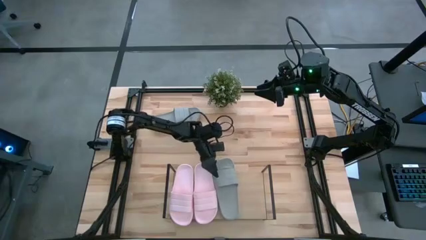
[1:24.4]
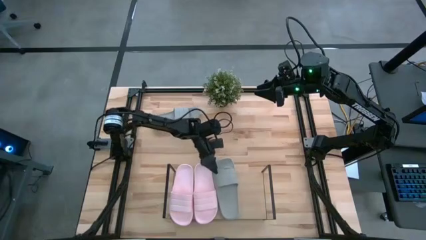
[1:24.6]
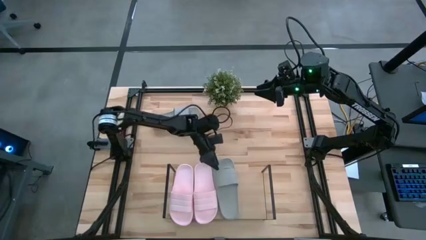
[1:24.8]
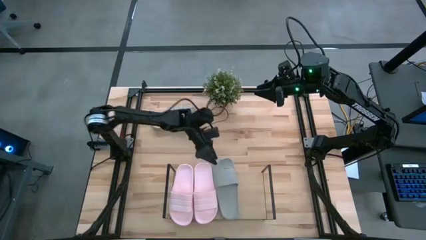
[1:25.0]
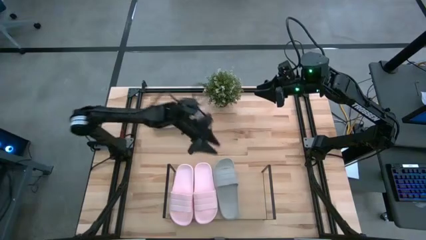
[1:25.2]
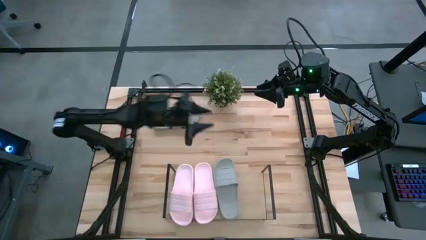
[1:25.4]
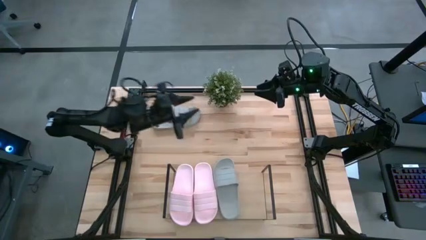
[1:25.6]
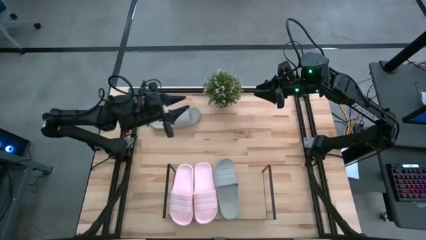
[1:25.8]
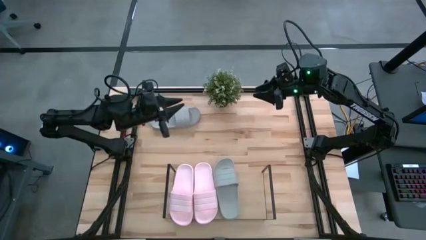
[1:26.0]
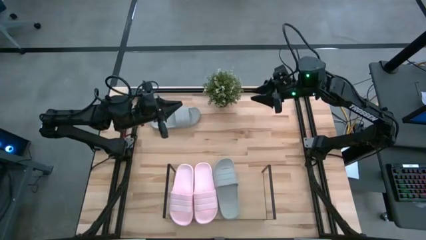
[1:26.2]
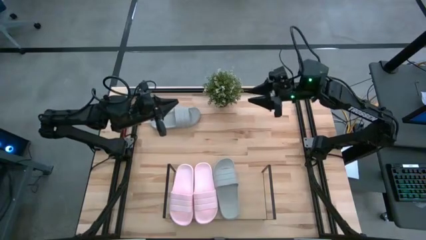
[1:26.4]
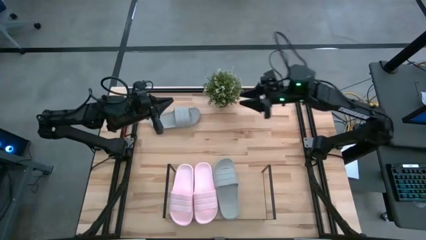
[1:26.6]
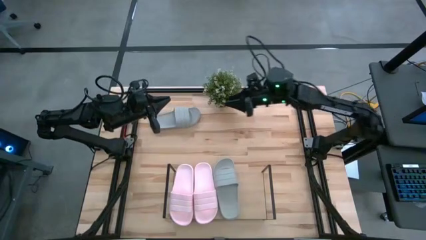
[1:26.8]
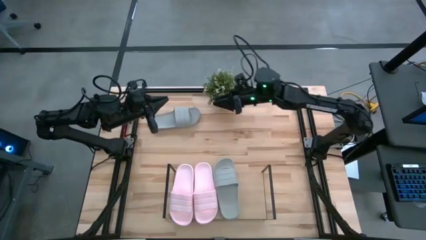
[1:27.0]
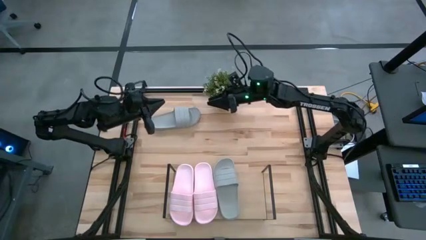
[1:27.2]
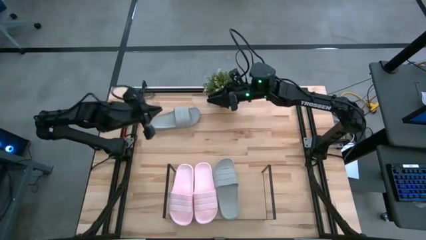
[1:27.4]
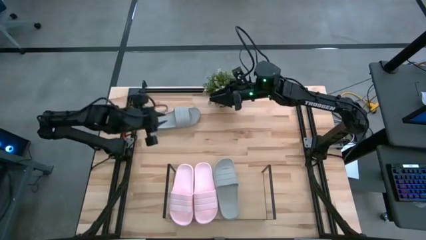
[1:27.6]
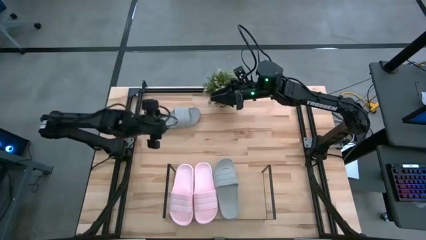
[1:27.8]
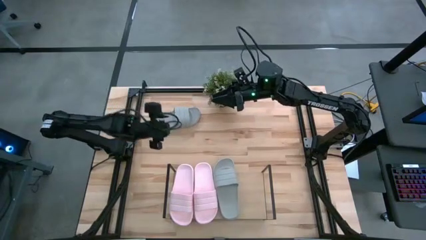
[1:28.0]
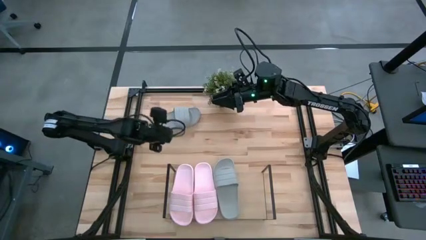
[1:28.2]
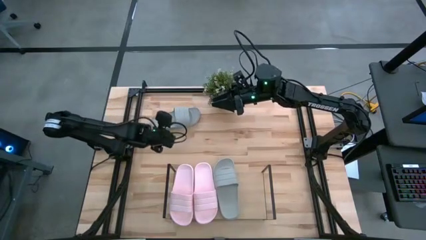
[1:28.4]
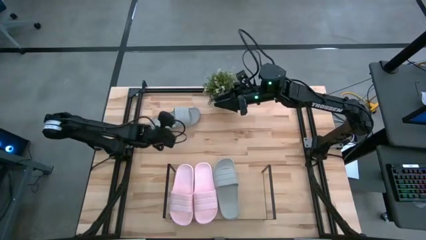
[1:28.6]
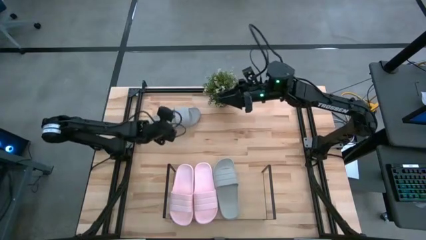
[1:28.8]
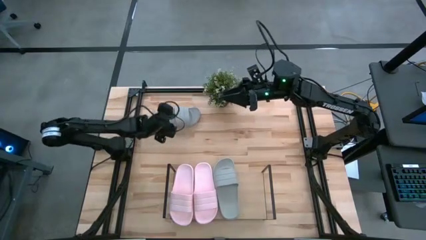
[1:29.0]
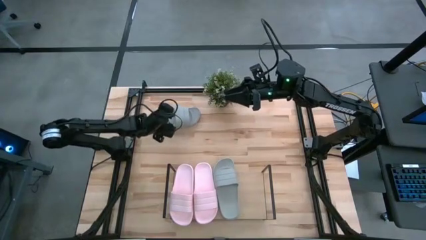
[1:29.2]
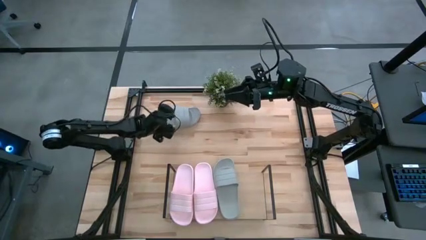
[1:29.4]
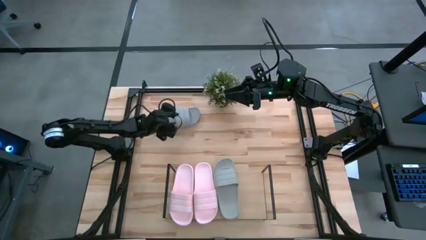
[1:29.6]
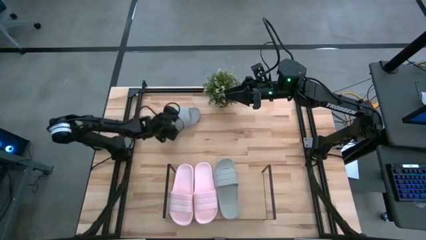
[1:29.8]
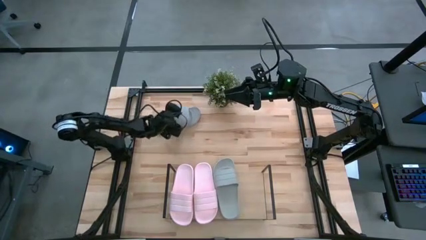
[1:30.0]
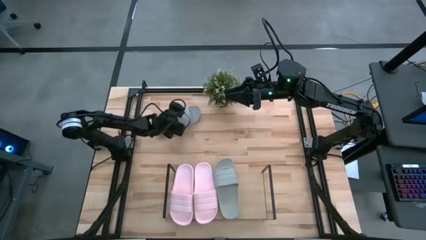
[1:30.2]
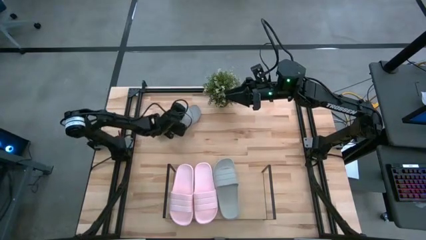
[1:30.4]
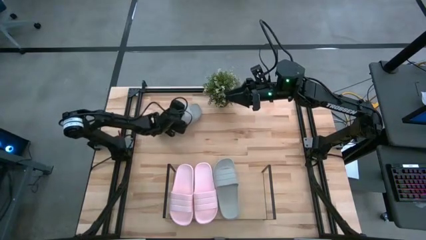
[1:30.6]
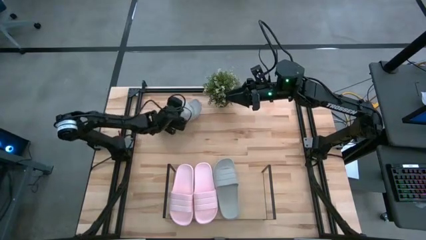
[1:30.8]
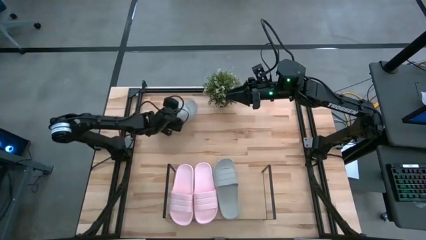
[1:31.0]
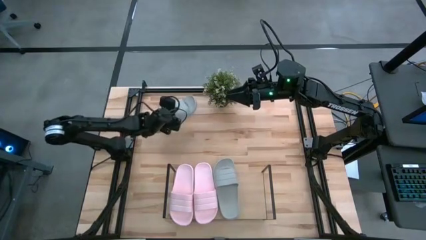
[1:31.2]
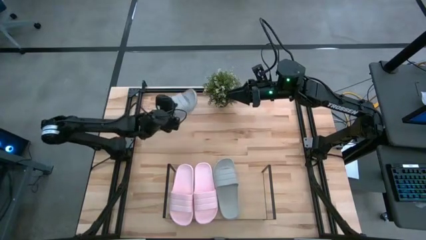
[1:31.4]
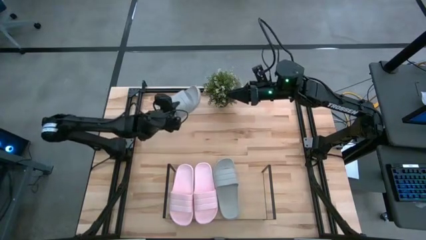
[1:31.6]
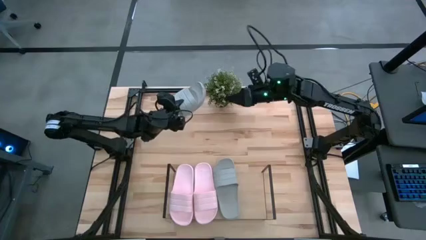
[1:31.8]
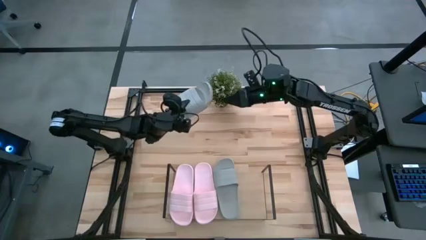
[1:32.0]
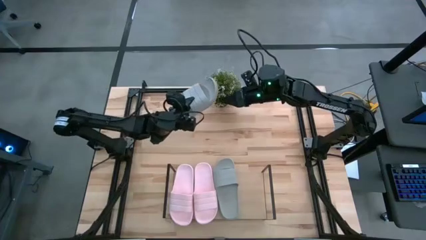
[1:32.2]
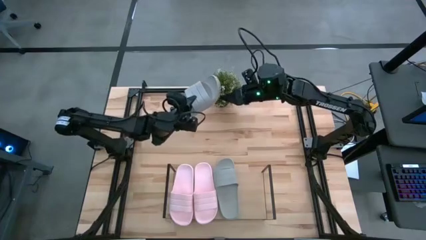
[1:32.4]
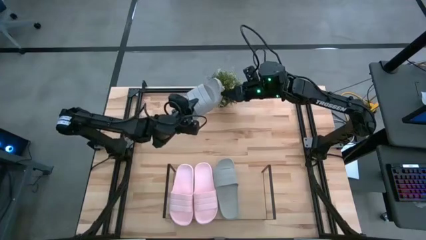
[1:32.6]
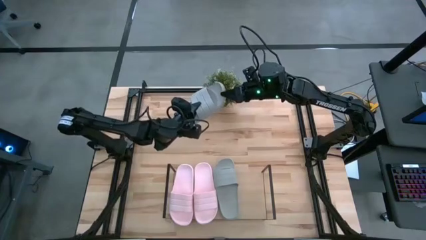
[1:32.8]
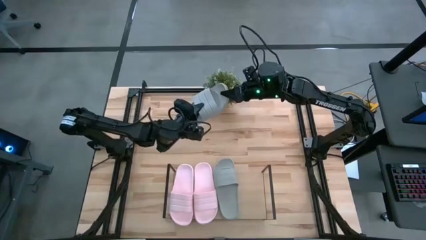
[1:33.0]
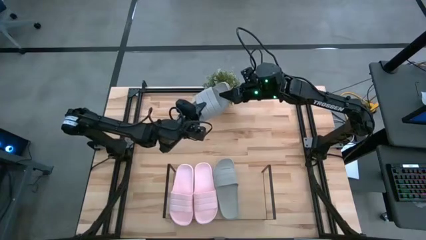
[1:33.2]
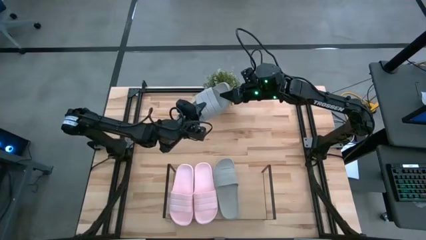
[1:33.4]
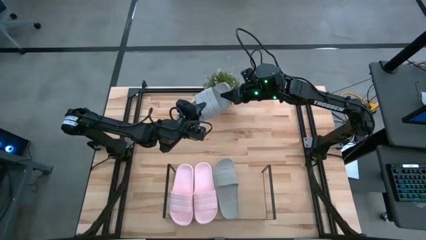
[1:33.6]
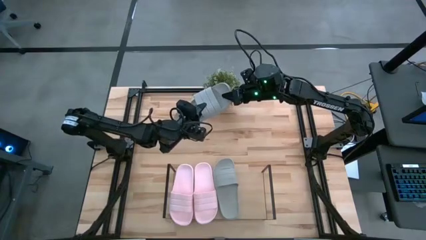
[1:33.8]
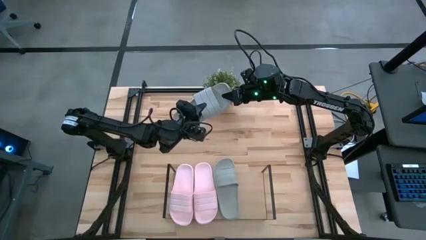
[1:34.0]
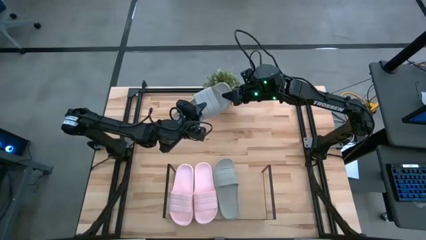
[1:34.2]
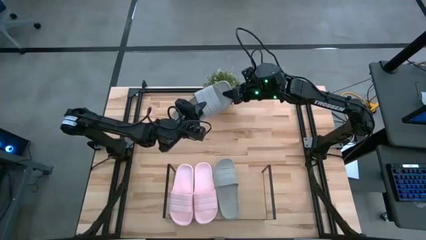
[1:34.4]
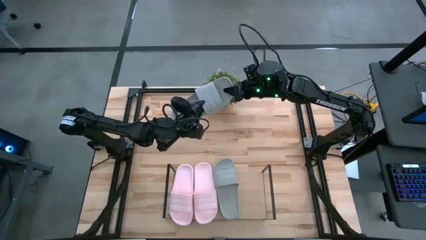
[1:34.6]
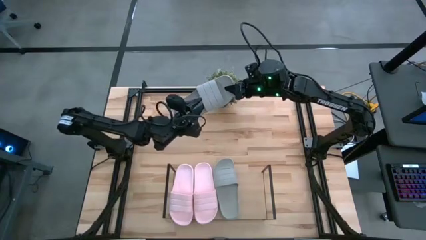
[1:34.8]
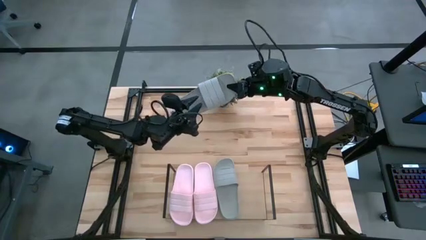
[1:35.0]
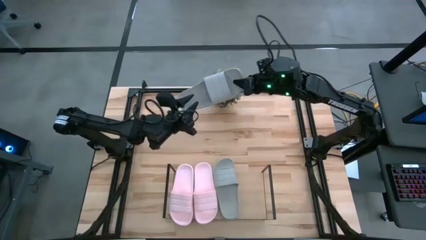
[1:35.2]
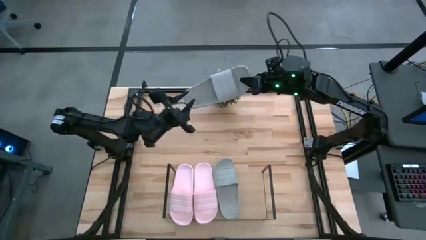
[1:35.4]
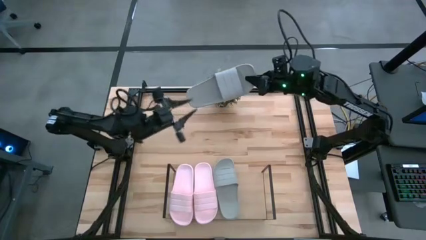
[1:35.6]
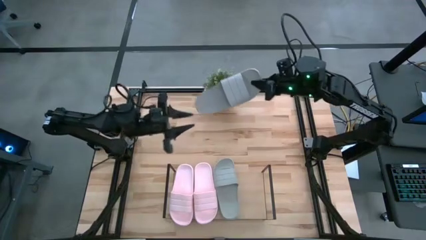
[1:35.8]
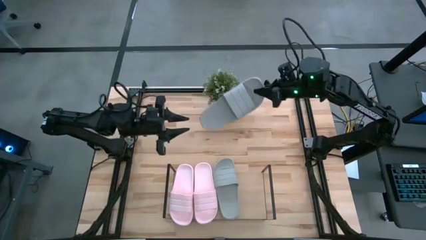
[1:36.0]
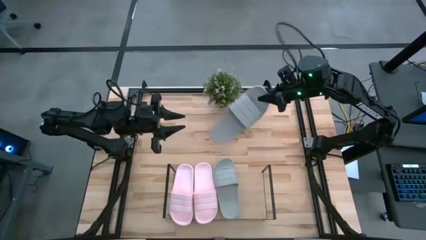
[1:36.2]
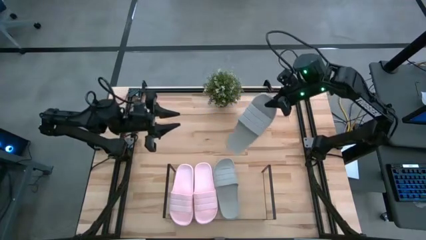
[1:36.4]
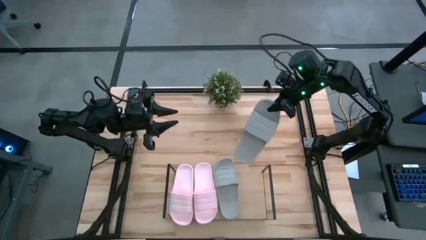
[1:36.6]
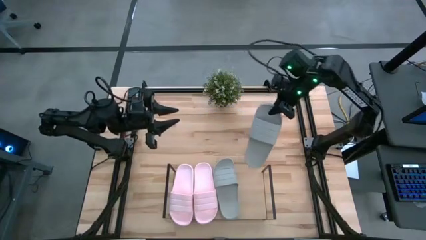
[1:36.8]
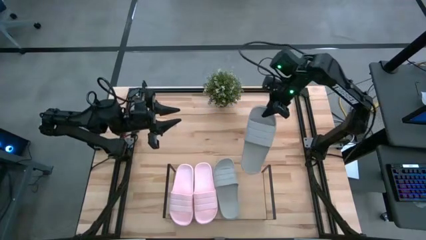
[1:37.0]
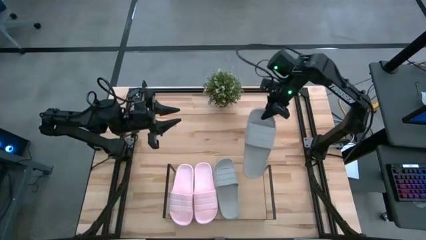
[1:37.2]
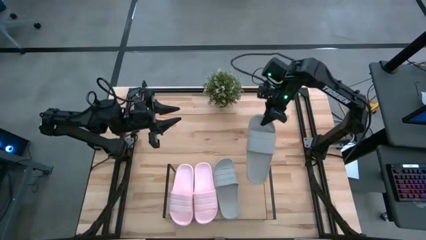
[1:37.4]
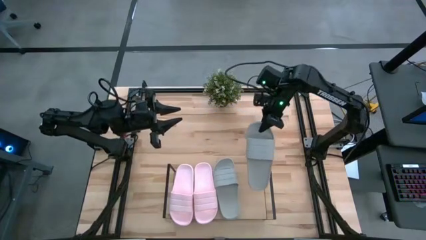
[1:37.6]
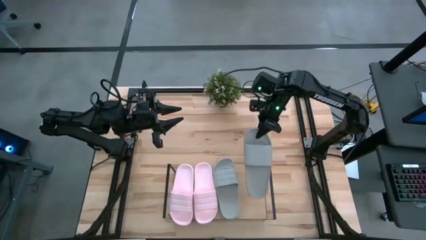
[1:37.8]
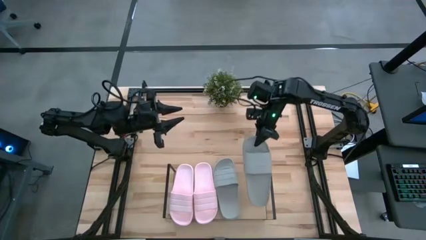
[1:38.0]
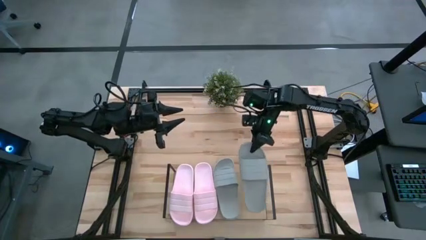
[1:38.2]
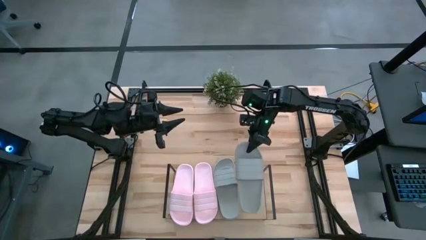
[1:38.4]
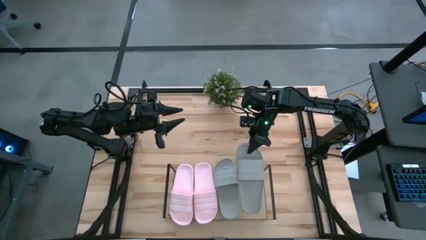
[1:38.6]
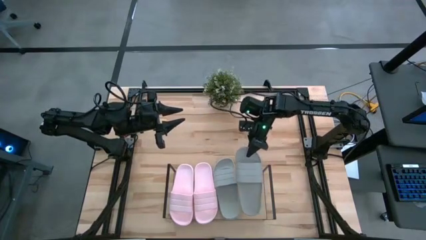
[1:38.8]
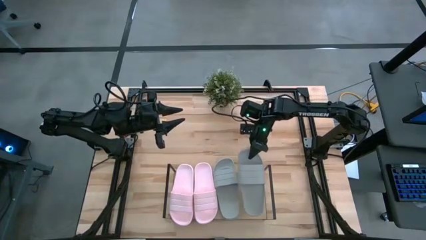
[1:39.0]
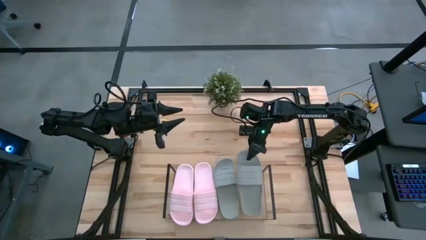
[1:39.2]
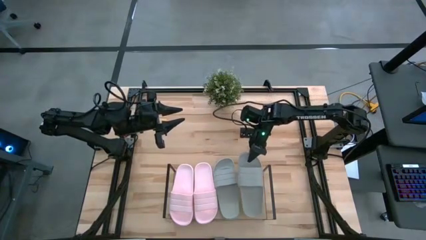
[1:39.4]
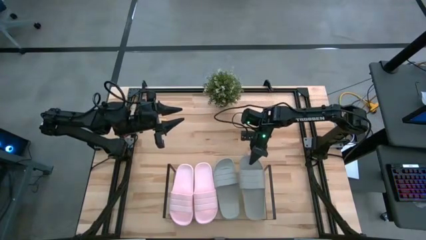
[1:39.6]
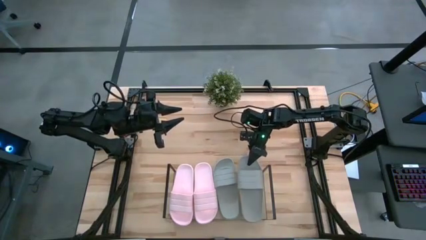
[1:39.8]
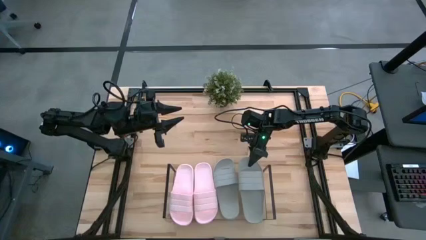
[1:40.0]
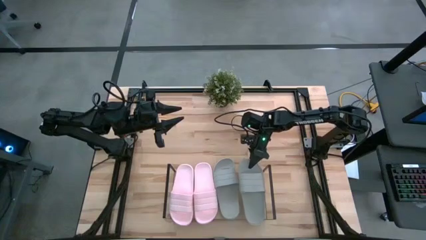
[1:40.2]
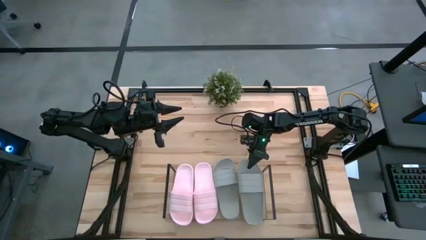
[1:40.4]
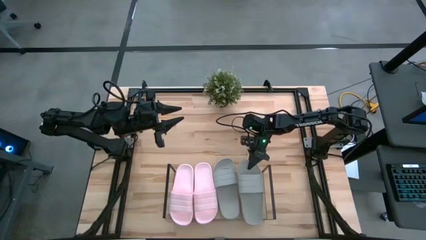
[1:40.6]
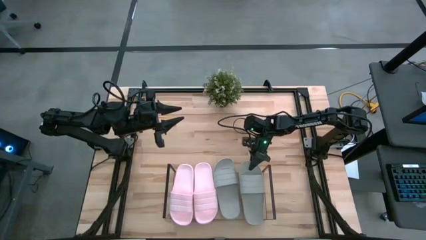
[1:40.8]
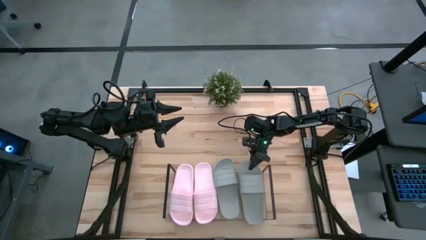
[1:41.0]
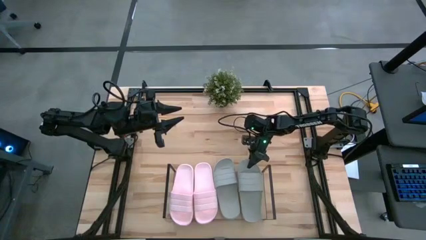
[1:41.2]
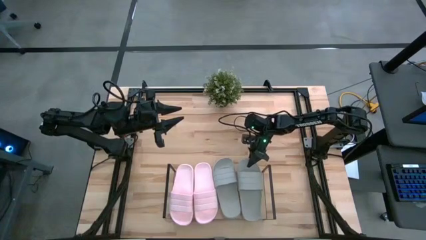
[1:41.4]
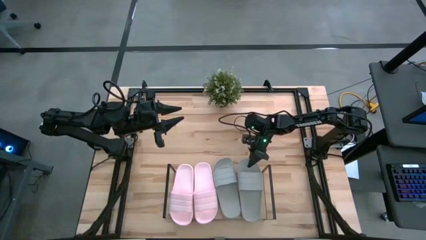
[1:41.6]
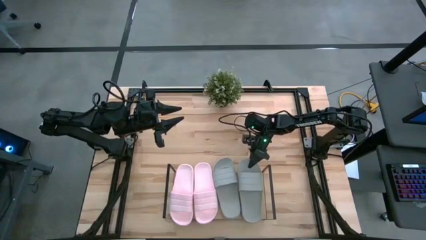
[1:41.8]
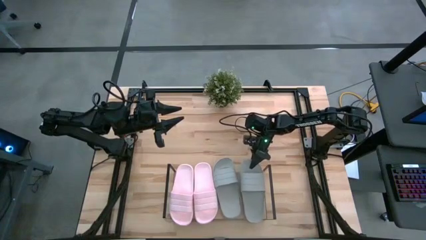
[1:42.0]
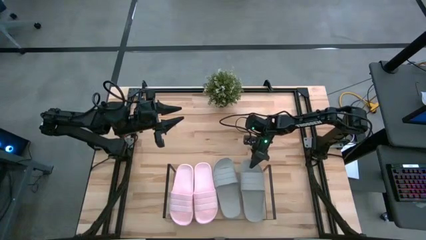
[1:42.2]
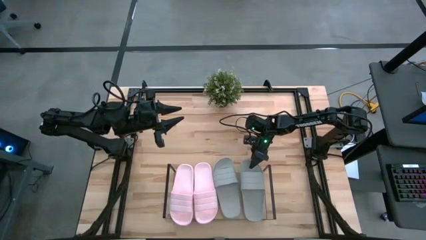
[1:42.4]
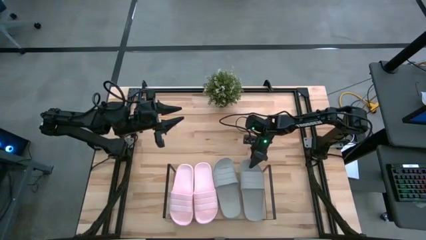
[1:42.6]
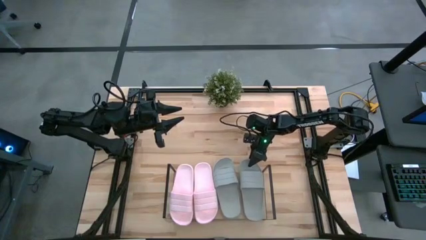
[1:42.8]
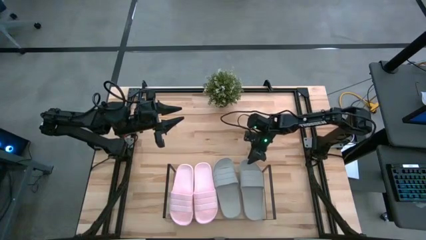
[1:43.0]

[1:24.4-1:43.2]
Task: Pick and place slides into the shelf
Put the gray slide on the shelf
